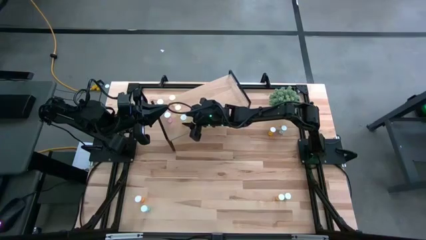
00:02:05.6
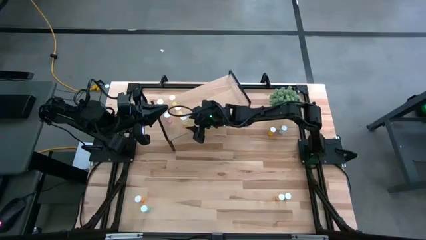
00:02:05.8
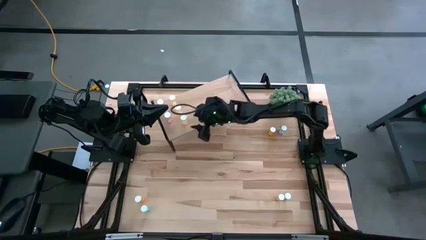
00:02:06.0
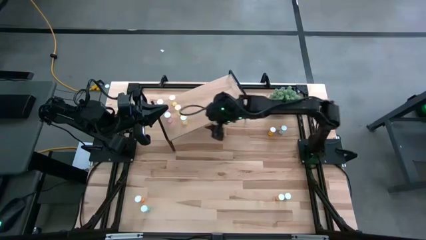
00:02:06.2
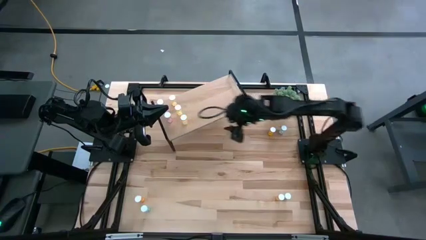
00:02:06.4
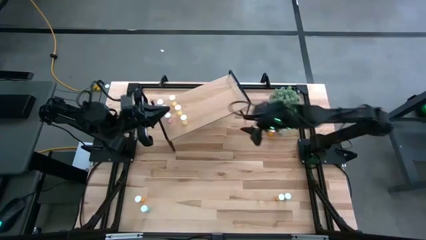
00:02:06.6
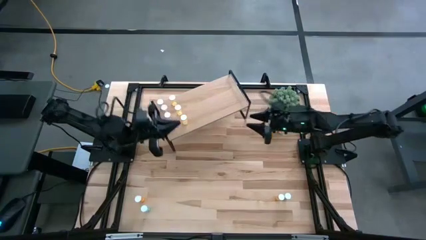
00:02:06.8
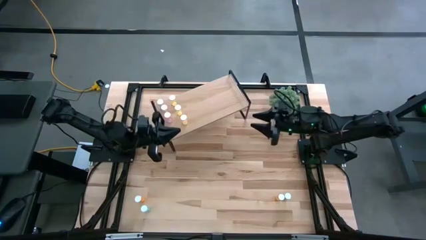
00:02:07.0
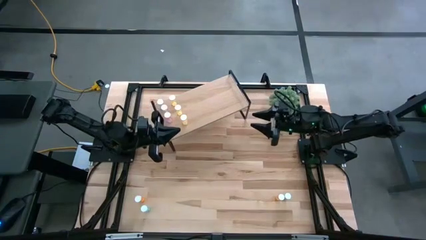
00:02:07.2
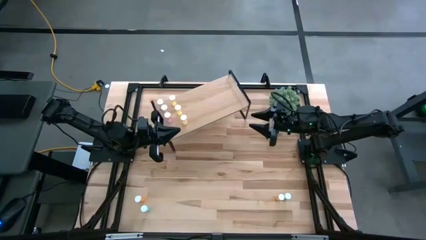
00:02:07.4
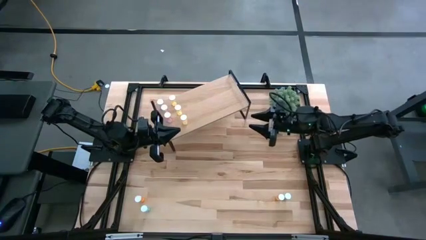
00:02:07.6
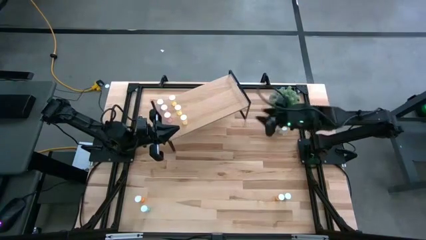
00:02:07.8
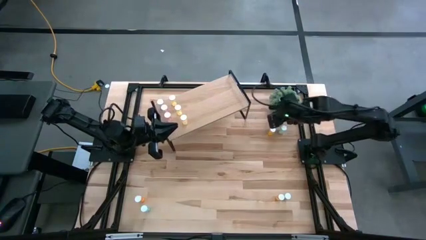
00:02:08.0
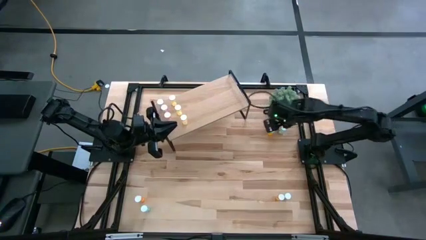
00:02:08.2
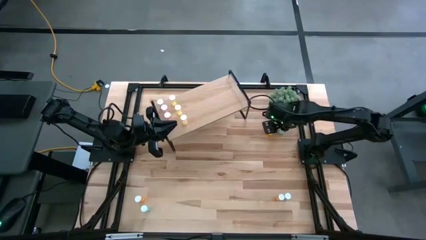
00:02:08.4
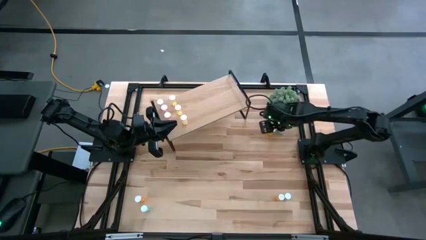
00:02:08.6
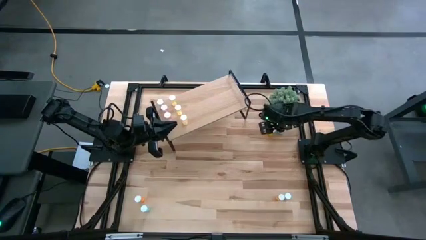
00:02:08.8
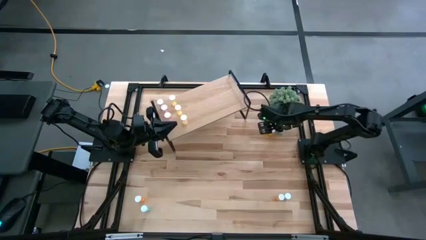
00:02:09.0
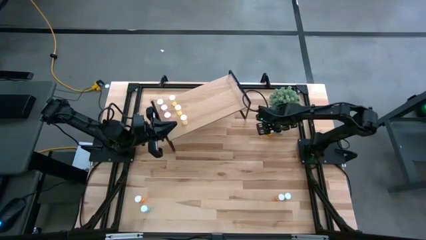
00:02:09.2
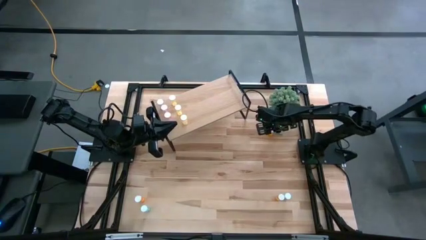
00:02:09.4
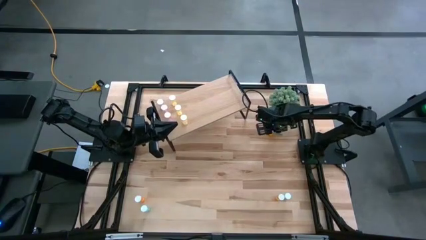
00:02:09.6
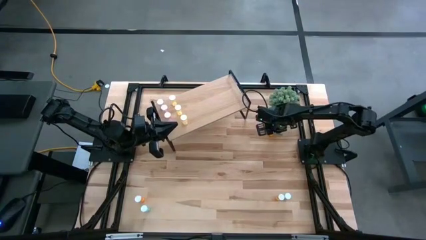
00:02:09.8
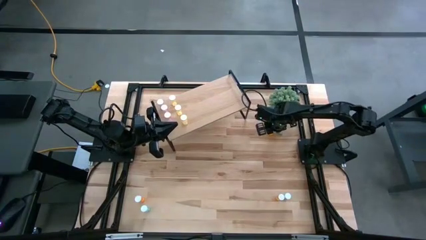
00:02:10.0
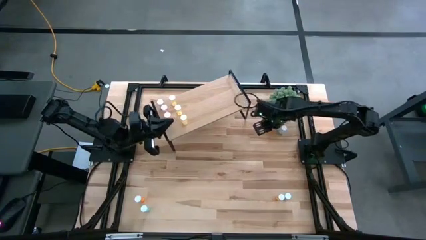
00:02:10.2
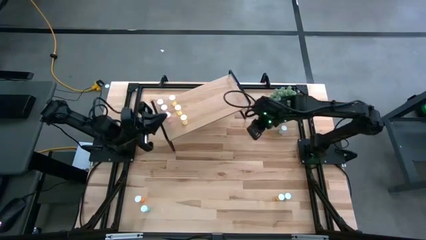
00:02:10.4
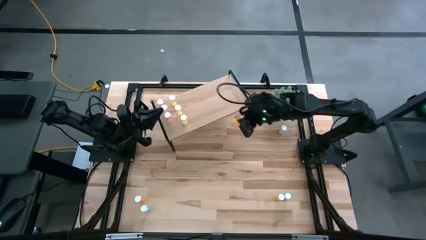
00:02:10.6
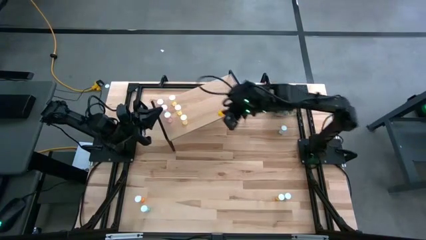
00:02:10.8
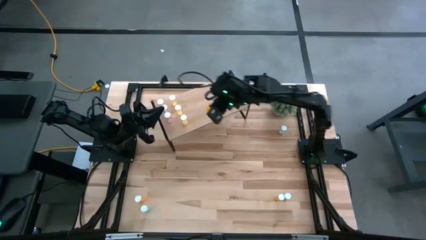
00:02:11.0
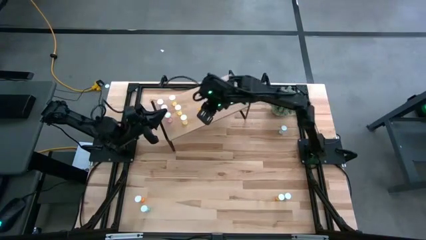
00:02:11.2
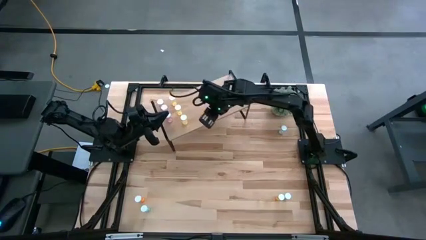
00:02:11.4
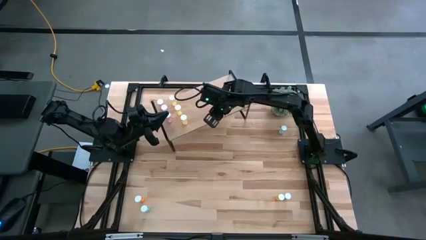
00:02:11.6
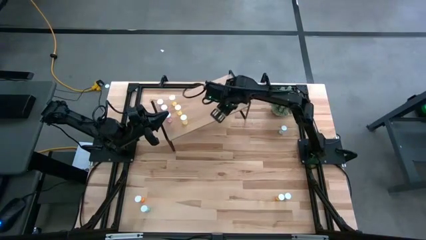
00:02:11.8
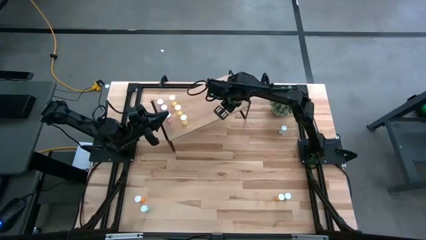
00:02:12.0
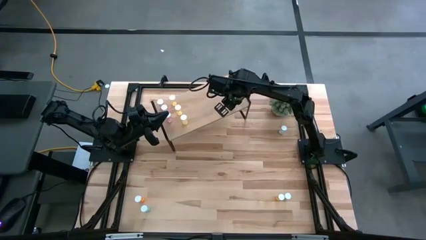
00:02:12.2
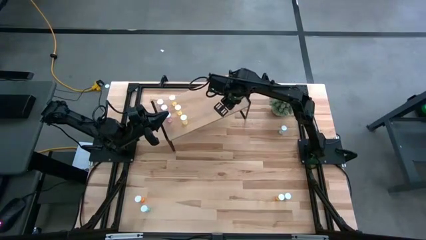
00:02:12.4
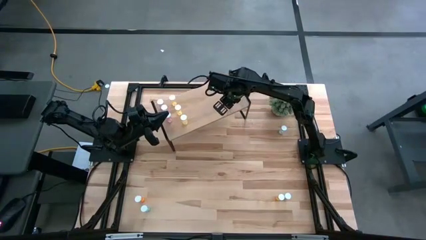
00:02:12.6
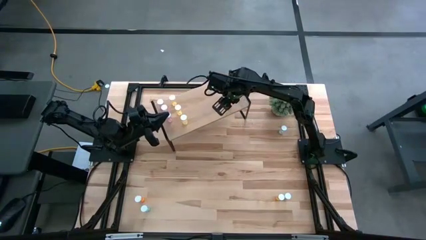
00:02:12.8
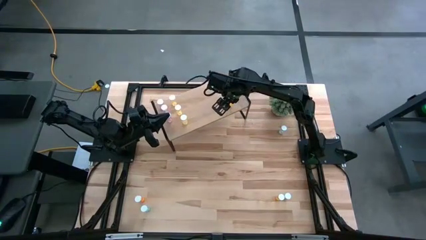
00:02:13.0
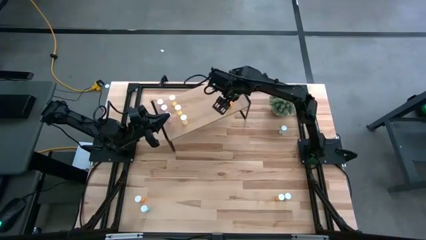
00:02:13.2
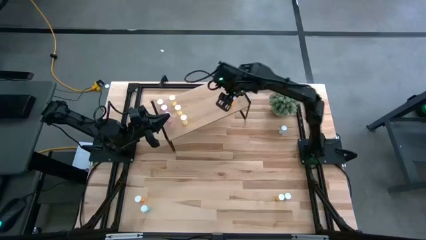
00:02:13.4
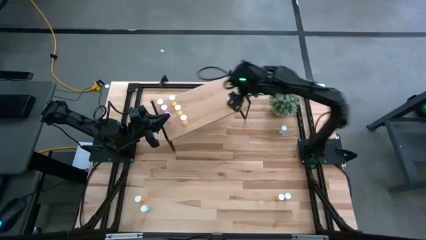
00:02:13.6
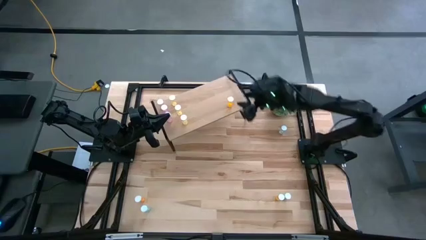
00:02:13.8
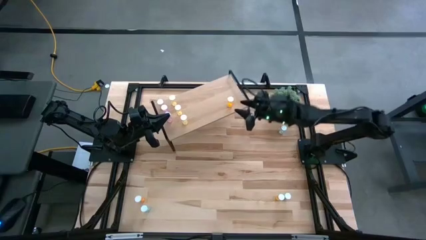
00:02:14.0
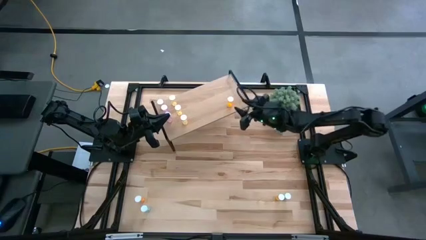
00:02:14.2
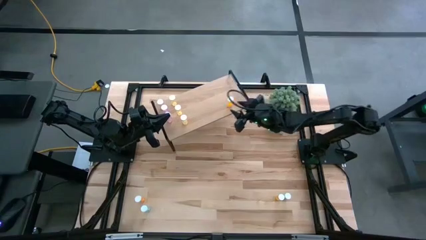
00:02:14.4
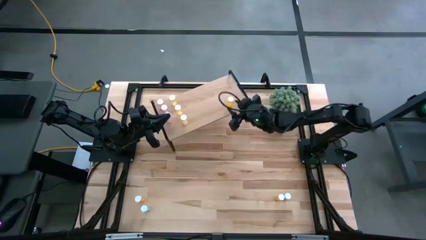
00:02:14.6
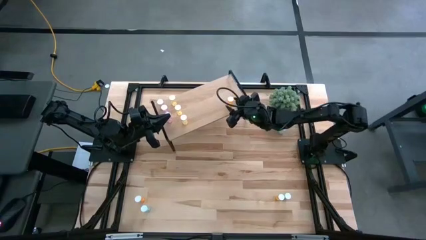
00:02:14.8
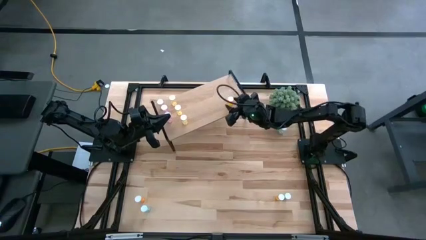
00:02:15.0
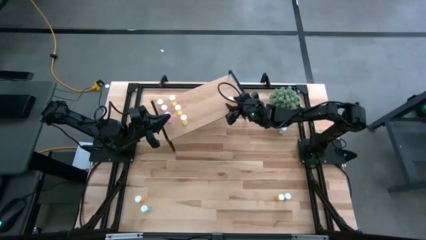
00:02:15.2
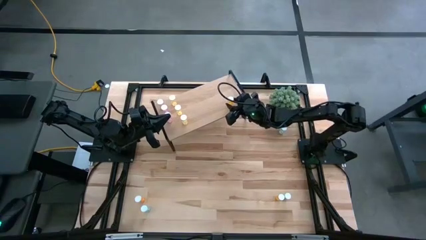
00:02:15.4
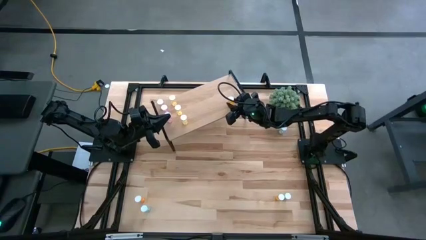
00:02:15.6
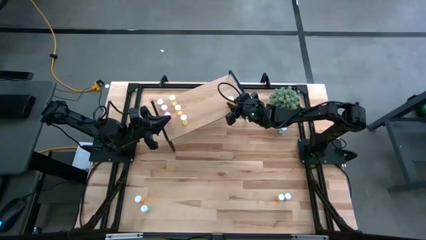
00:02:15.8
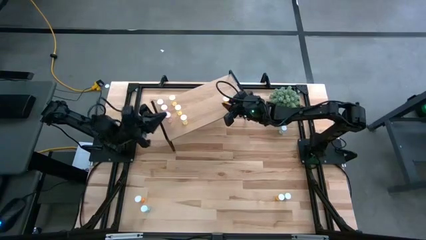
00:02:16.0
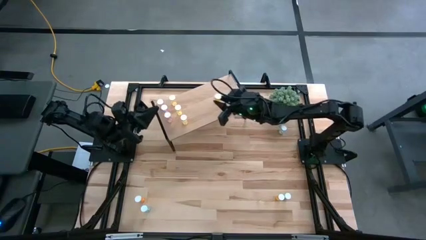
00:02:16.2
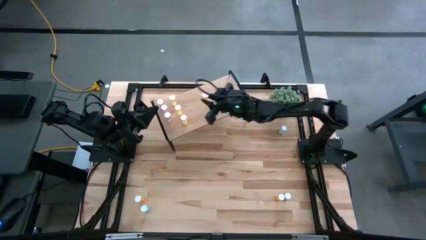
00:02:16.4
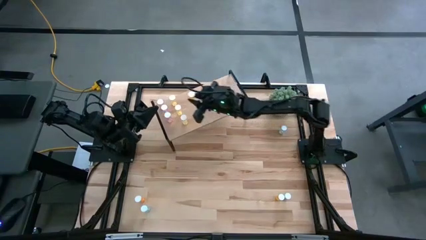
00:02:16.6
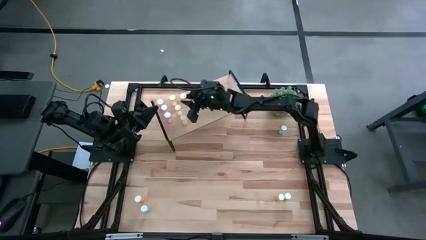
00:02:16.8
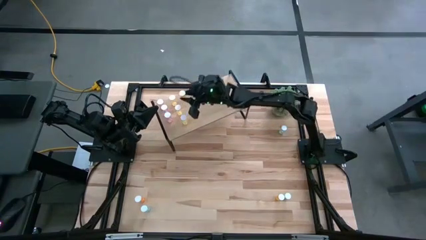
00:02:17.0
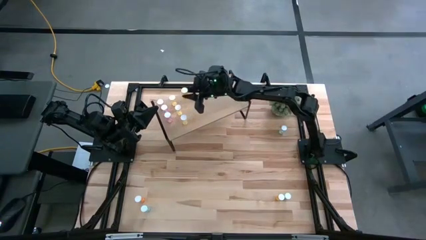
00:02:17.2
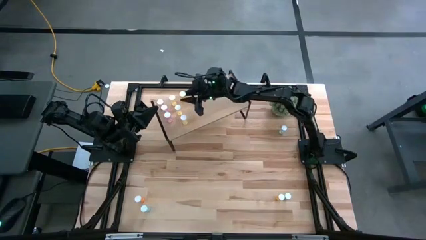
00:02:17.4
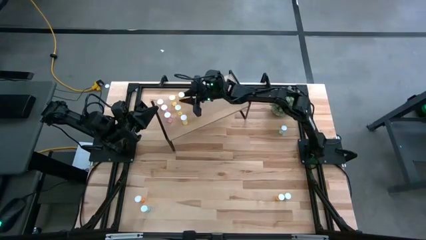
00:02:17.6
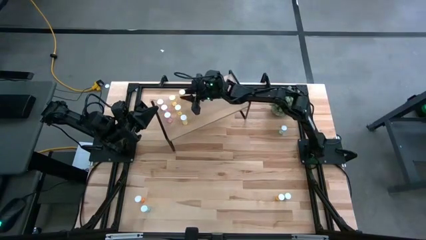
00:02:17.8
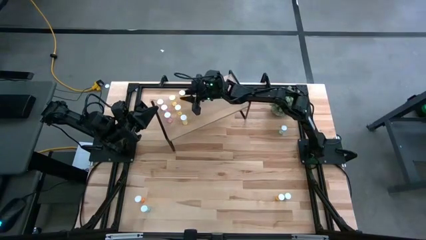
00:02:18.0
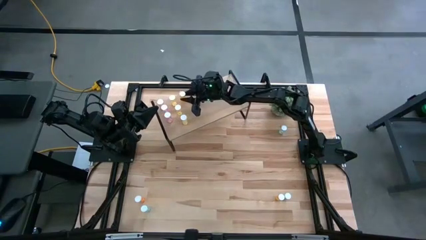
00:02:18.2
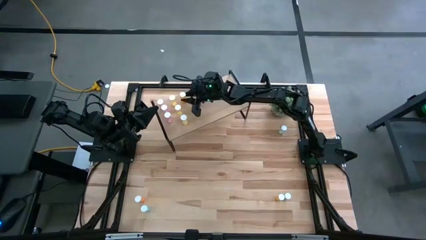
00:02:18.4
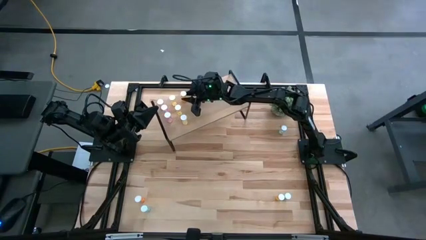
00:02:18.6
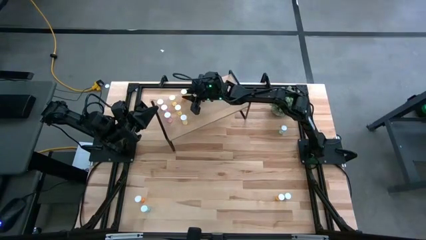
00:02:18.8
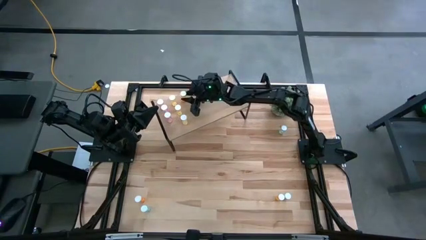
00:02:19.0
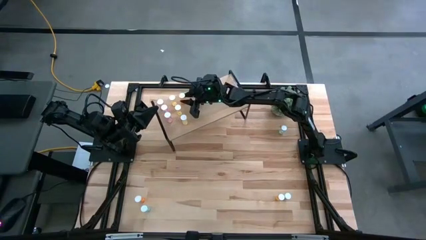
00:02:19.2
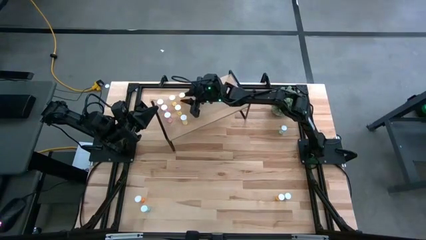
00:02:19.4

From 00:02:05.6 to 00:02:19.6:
Task: Pick and place medicine bottles onto shelf by color
Put the top right orange pill bottle on the shelf

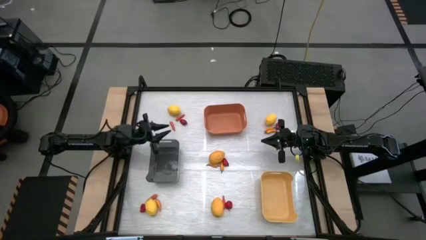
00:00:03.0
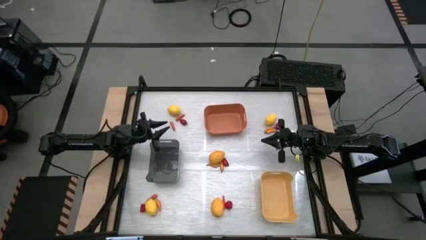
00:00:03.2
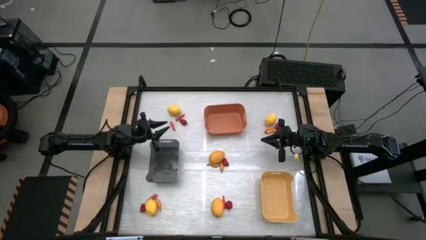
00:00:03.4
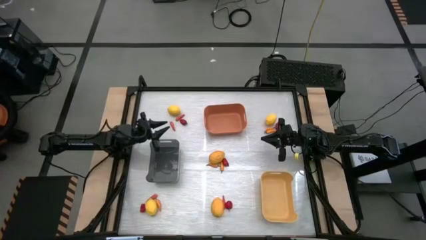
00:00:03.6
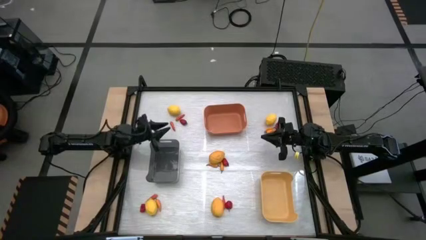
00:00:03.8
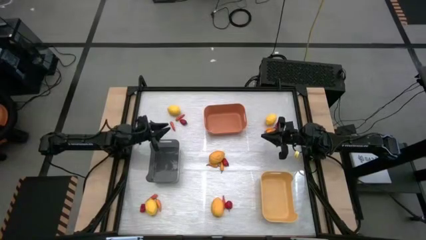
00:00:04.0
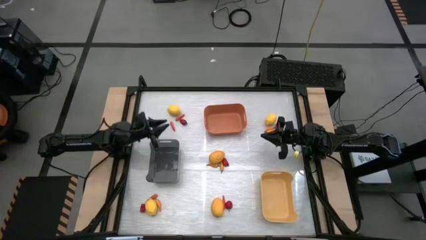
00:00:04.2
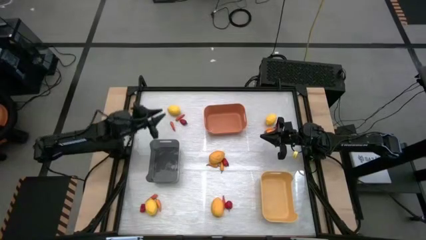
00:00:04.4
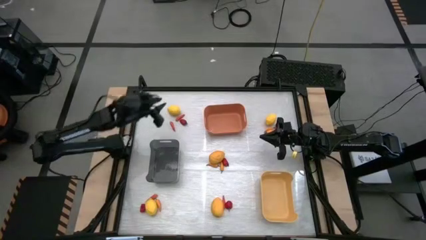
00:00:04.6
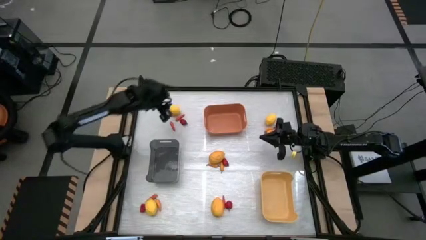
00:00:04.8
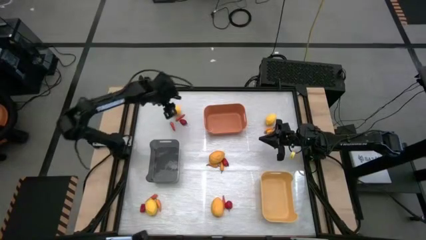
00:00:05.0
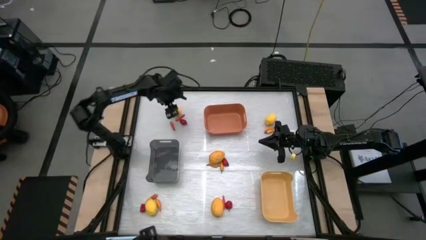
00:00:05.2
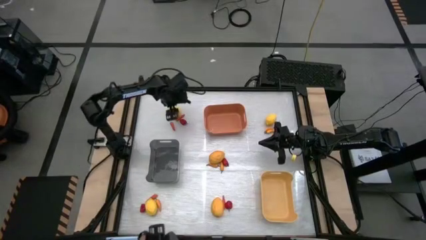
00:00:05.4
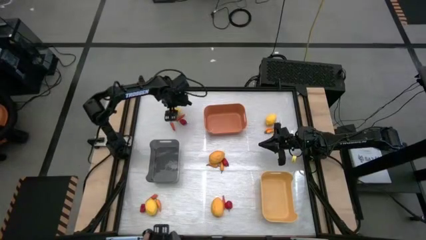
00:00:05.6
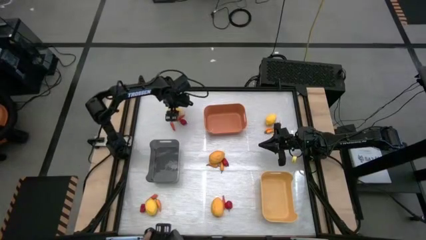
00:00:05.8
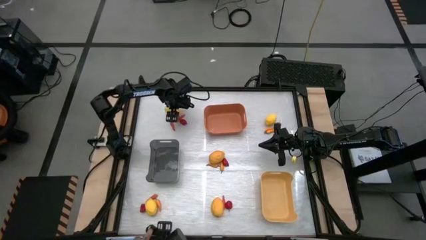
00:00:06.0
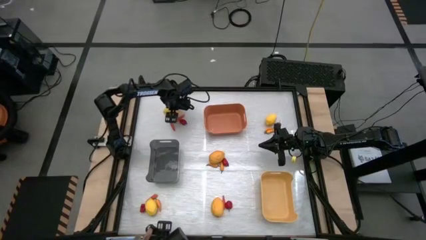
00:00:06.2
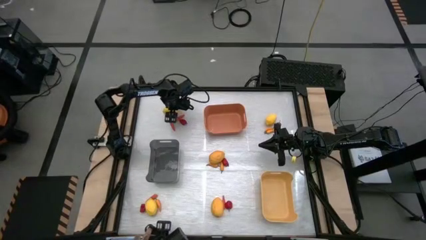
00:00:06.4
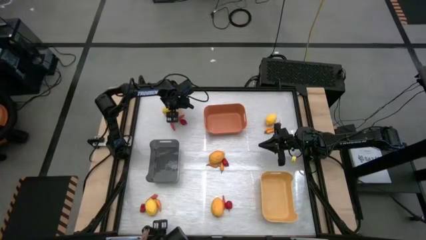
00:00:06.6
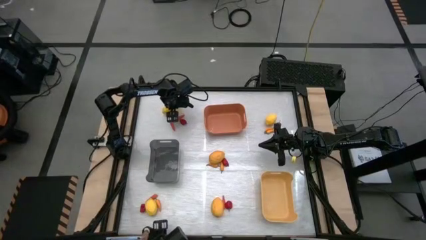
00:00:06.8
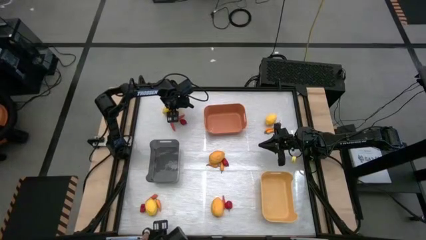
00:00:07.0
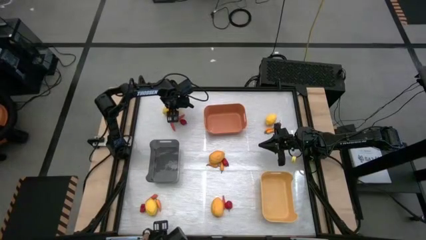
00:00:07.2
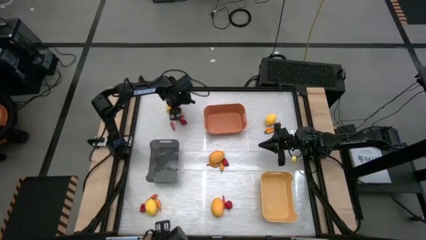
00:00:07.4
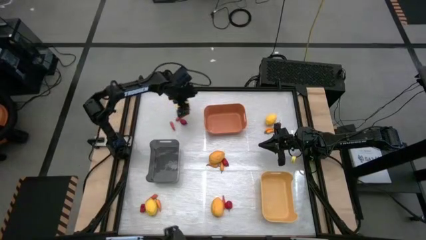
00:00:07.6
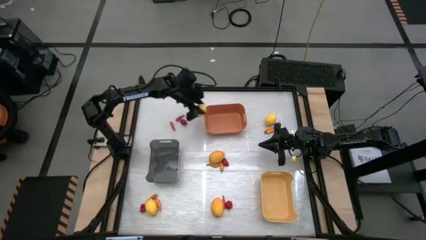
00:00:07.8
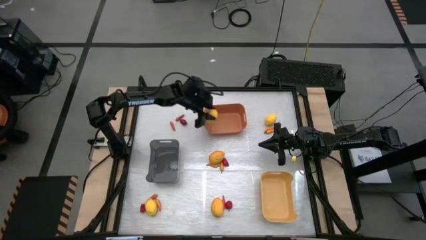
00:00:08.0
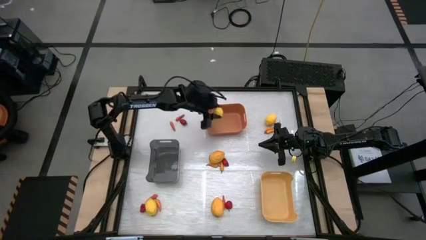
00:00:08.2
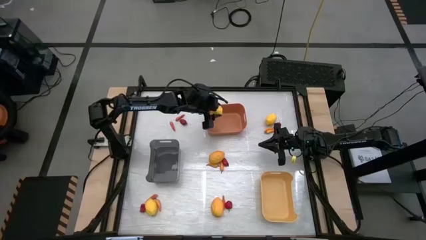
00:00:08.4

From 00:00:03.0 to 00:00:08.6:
Task: Sort produce into baskets
Put the lemon into the orange bin
